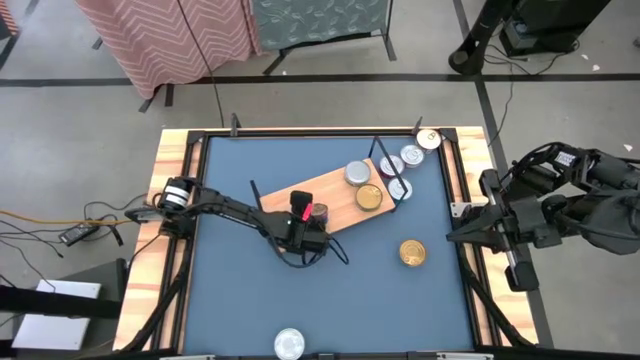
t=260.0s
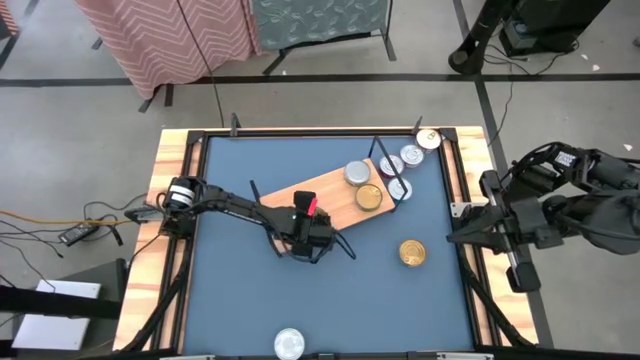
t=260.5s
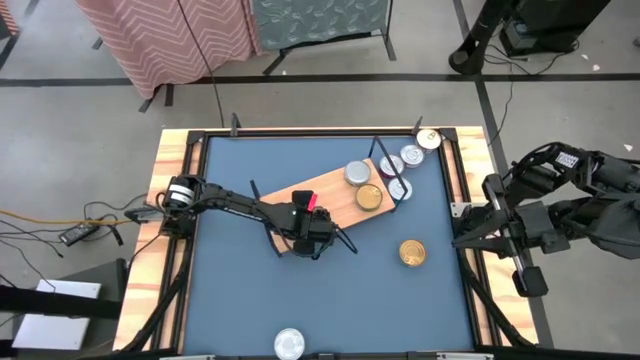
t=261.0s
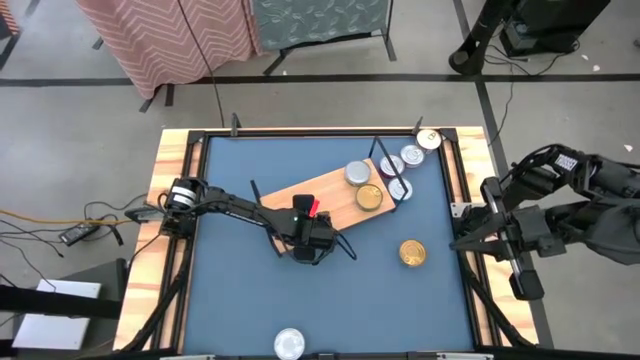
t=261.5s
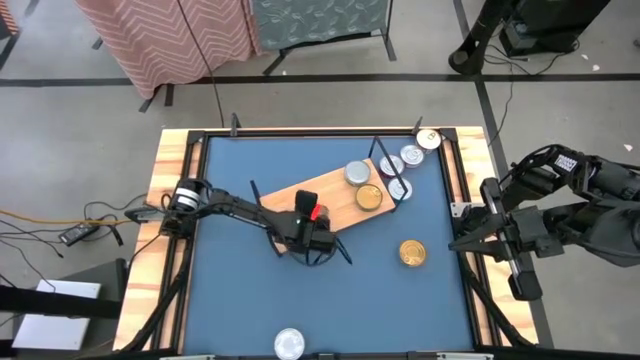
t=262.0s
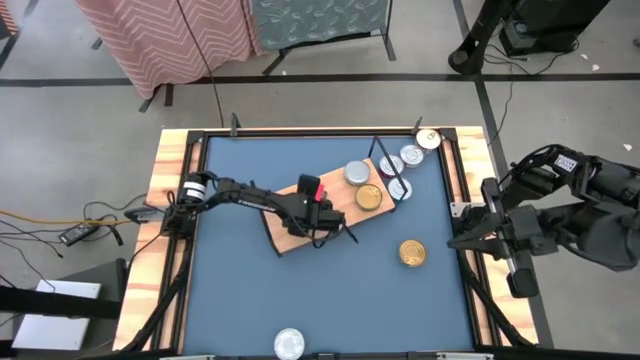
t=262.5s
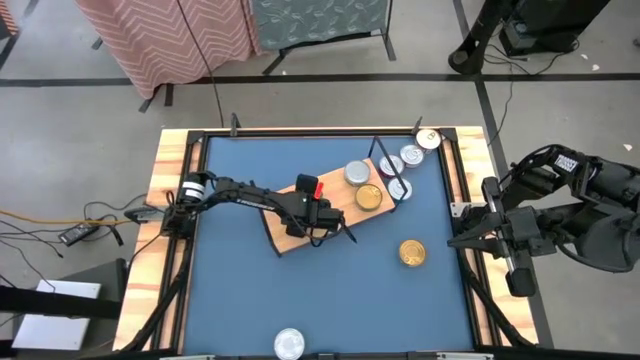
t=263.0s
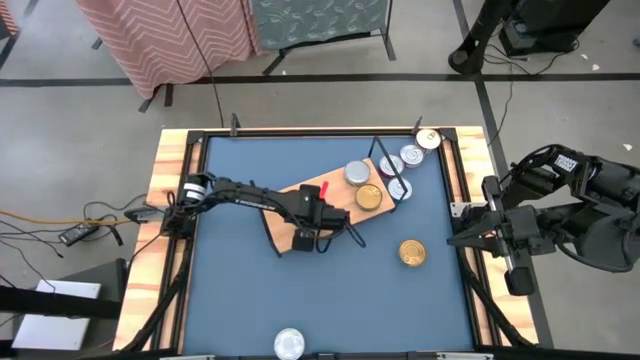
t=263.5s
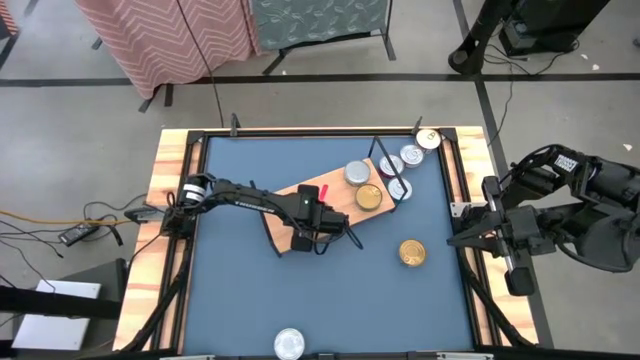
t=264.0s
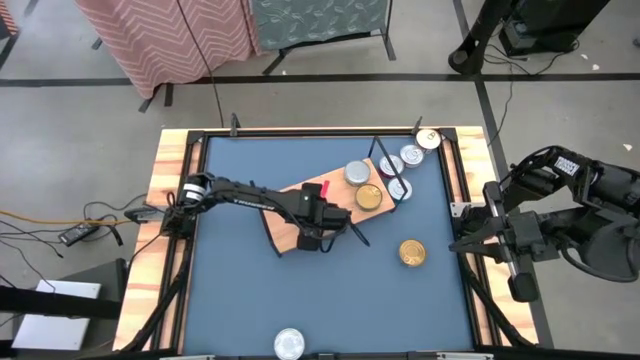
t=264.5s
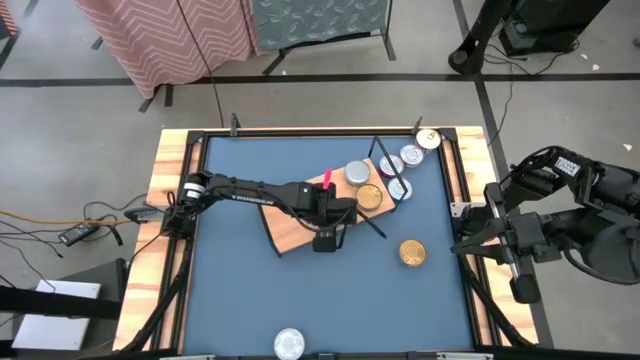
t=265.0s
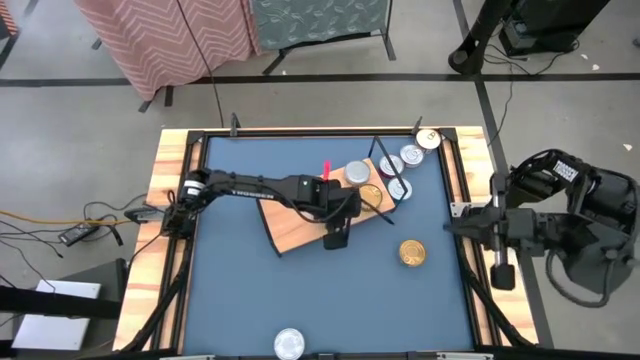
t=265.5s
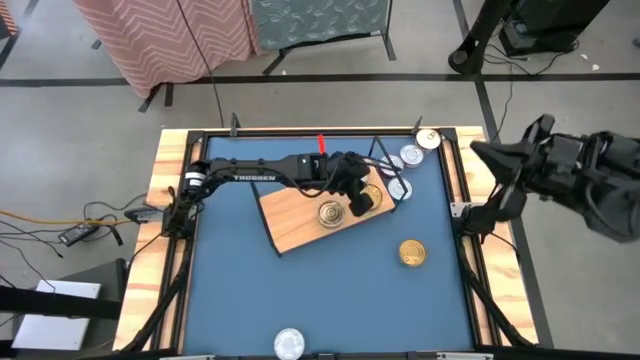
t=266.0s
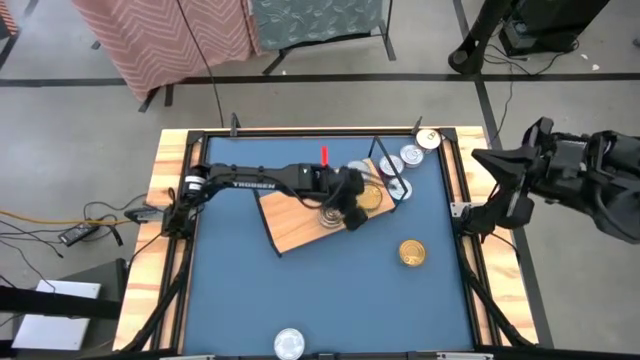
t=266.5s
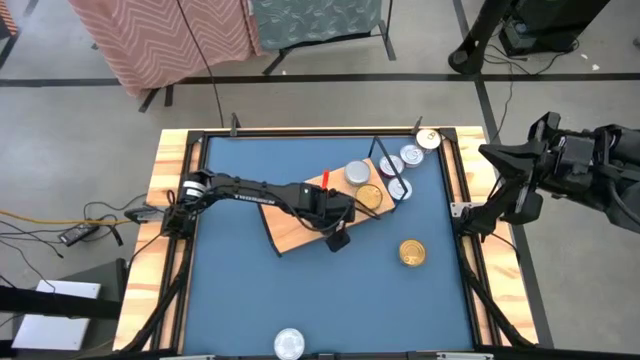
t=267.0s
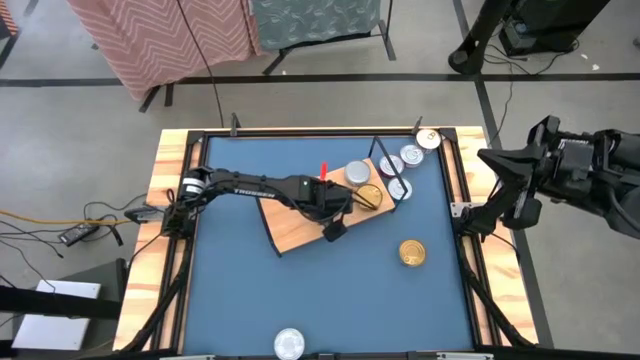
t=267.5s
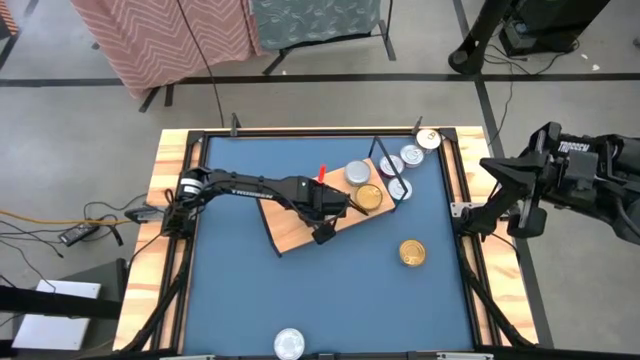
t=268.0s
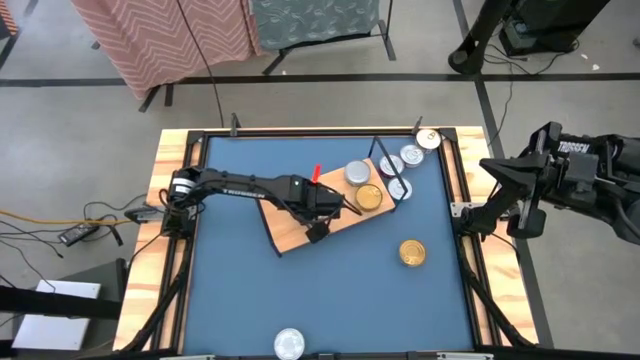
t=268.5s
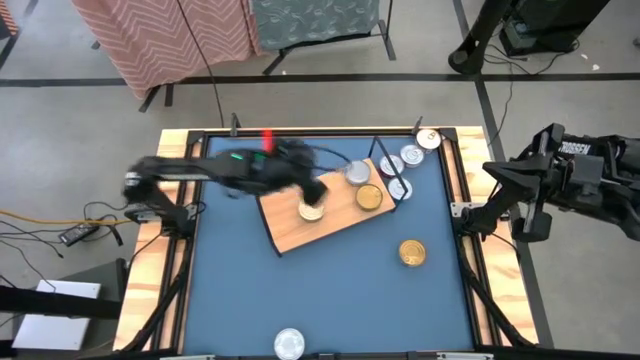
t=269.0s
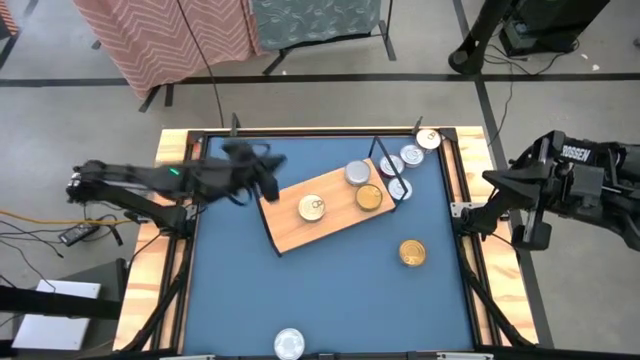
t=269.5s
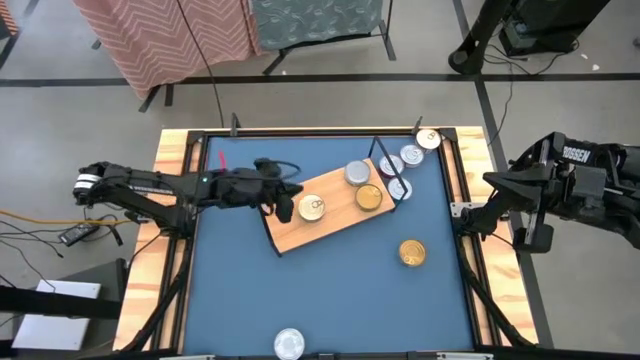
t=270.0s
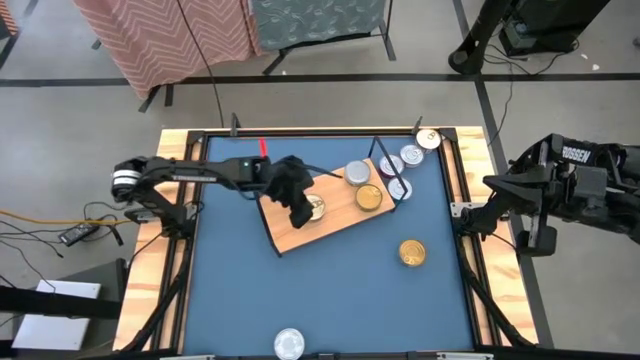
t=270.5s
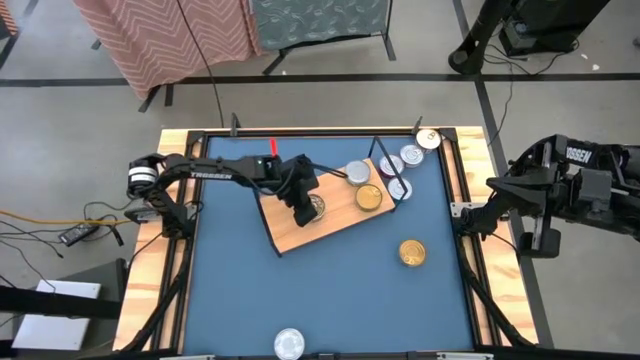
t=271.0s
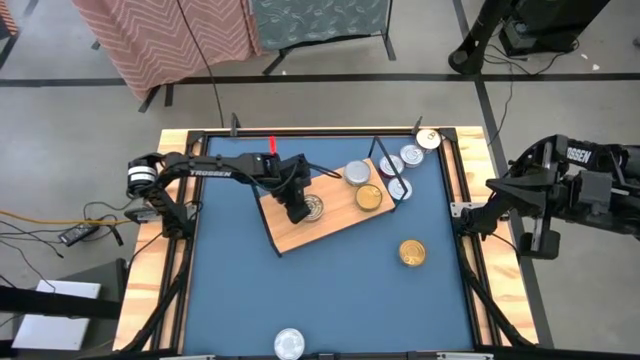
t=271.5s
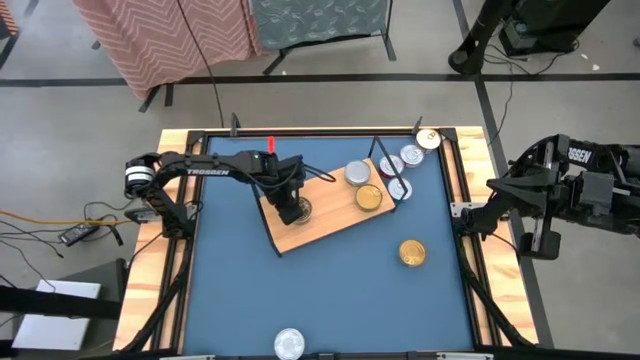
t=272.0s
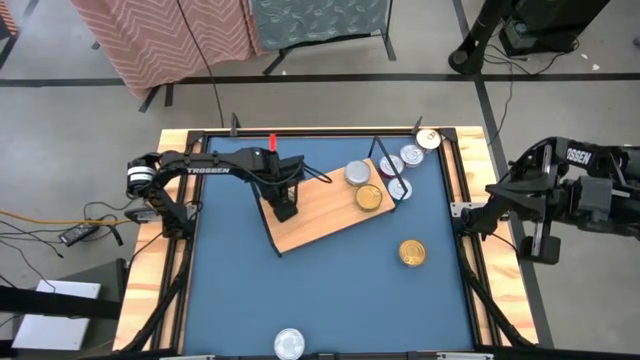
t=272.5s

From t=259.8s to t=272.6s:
Task: Stack canned seafood by type on shelf
Put the blue/pink tuna can on the shelf

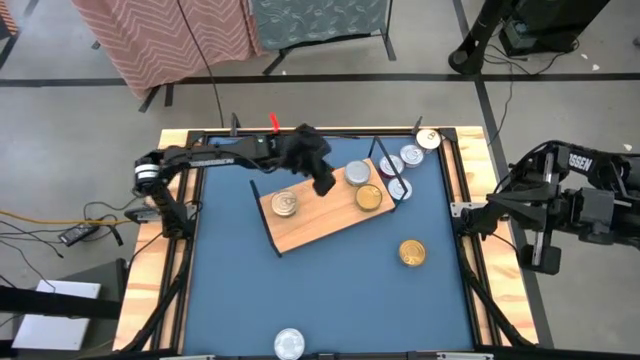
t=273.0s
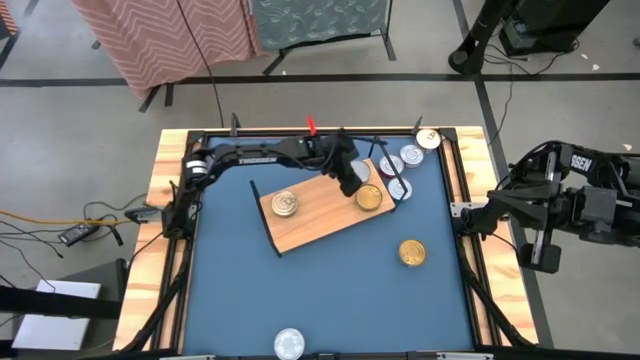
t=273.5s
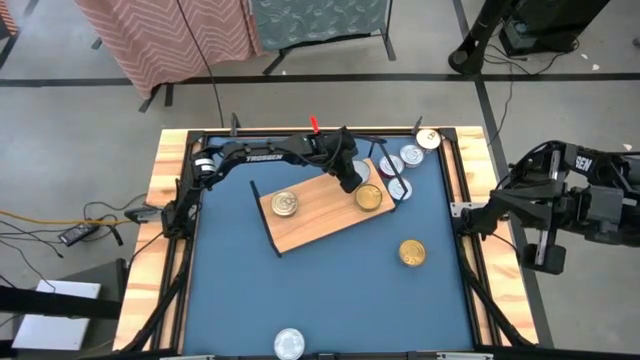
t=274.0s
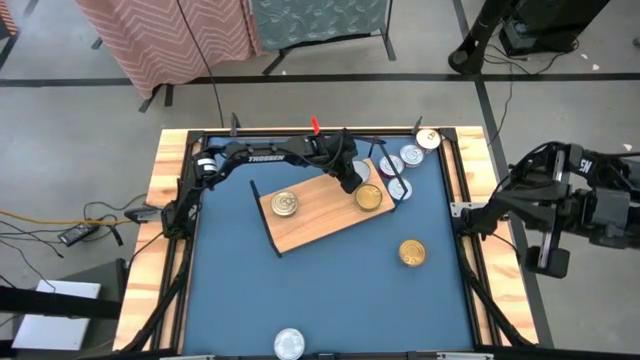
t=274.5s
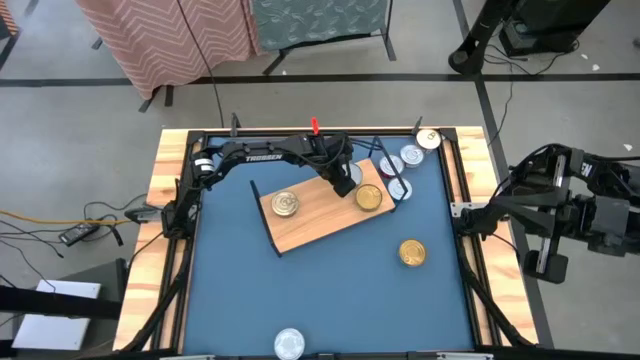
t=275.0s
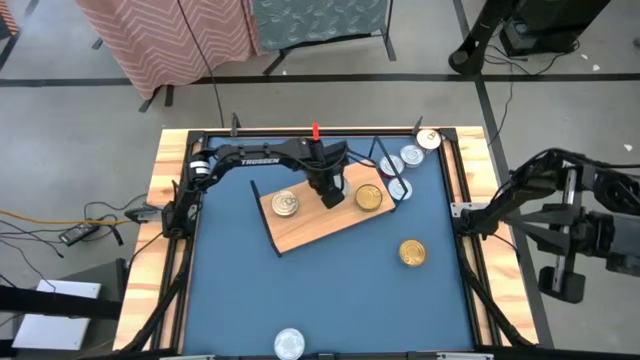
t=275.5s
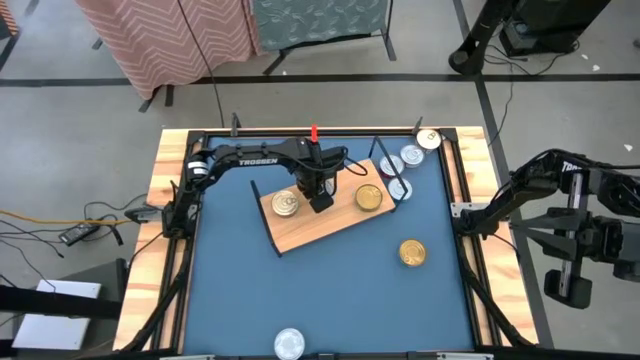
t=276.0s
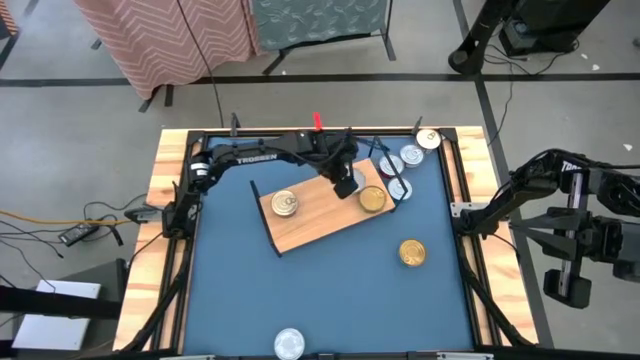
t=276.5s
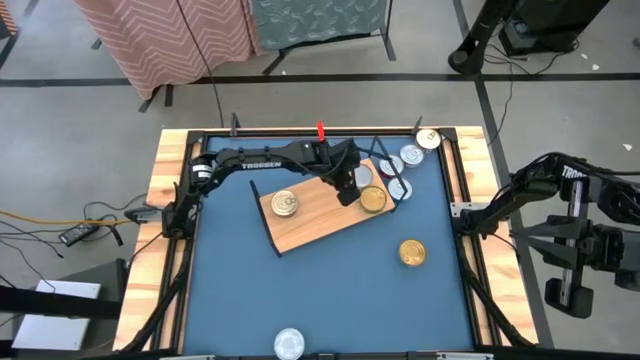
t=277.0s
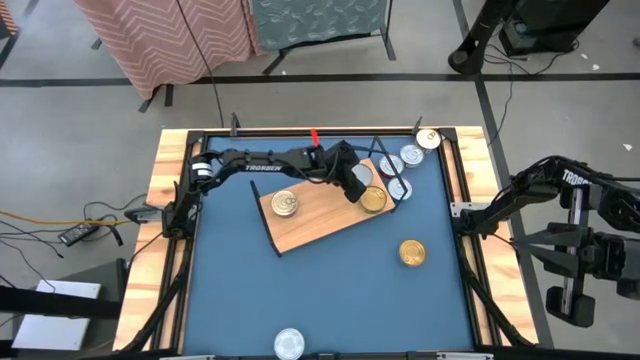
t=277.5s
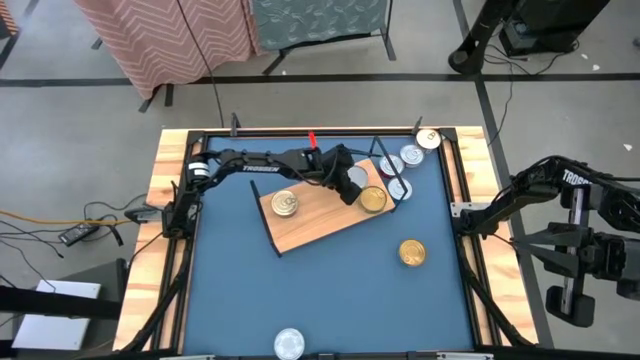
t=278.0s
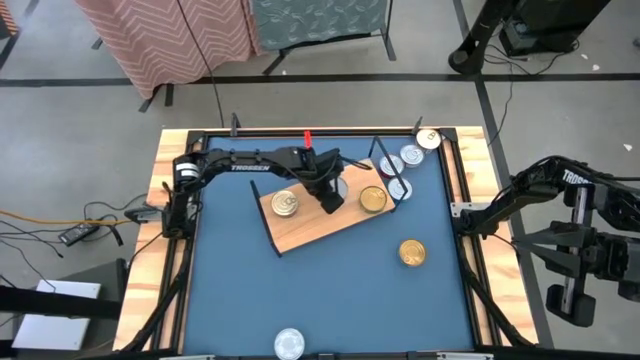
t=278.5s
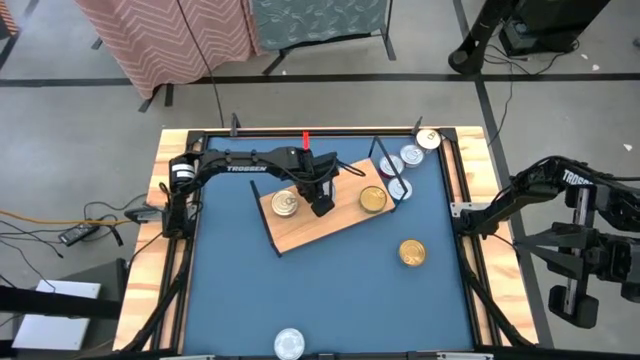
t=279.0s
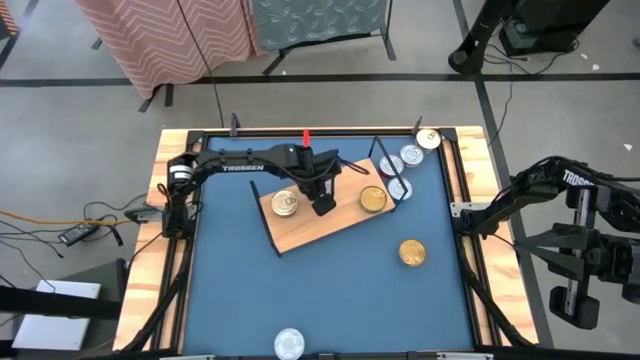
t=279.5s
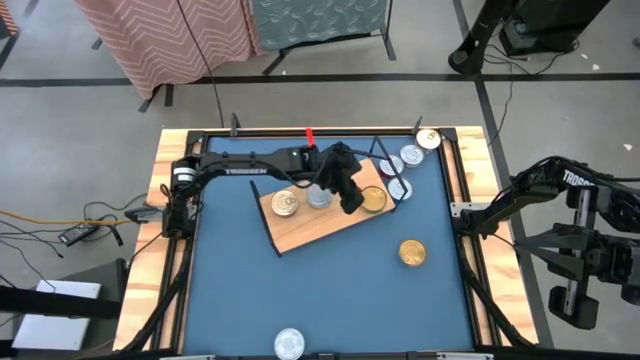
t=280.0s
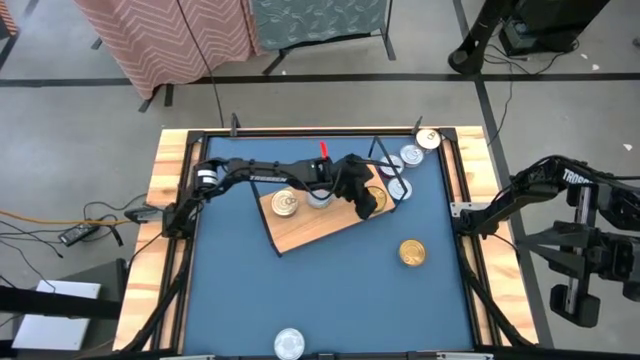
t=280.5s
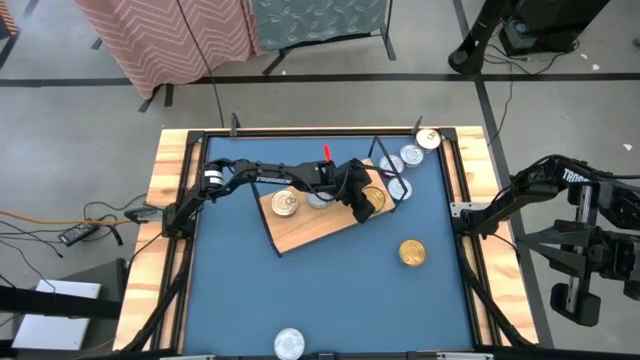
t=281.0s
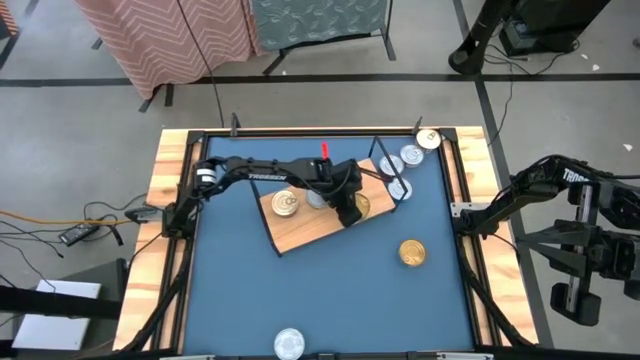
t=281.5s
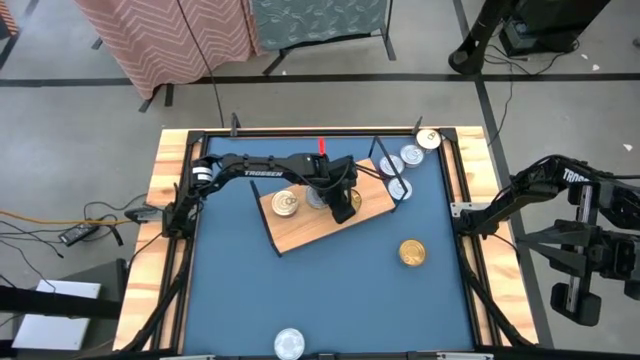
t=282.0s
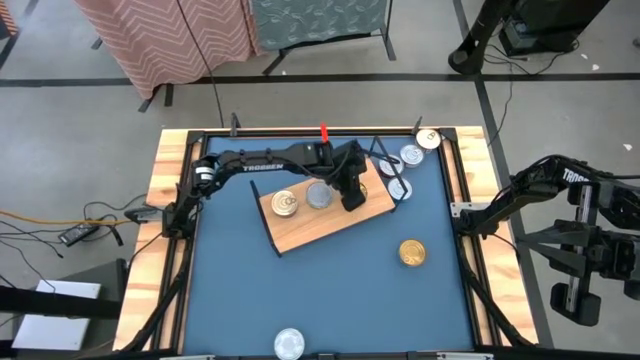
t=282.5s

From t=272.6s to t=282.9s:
Adjust the tuna cans on the shelf
